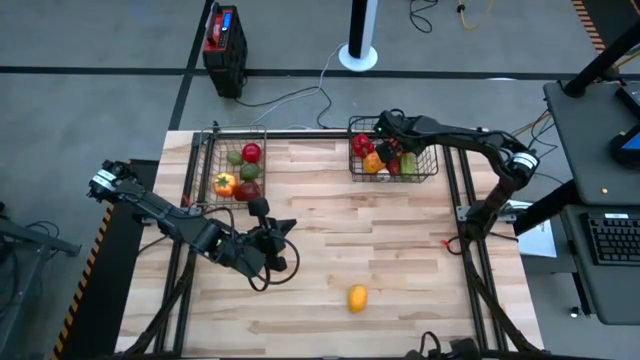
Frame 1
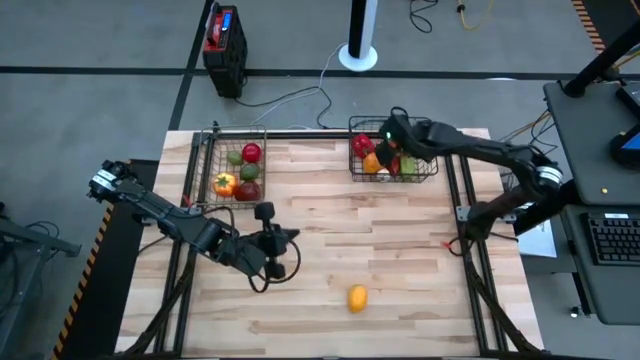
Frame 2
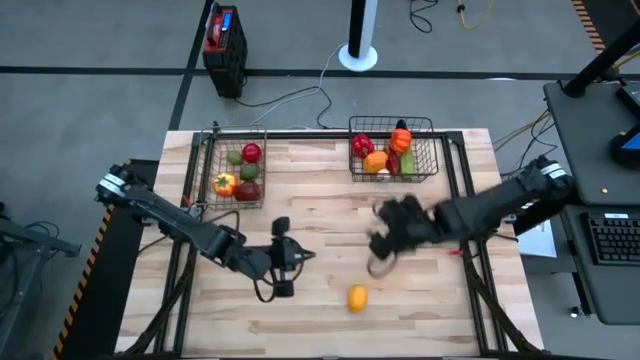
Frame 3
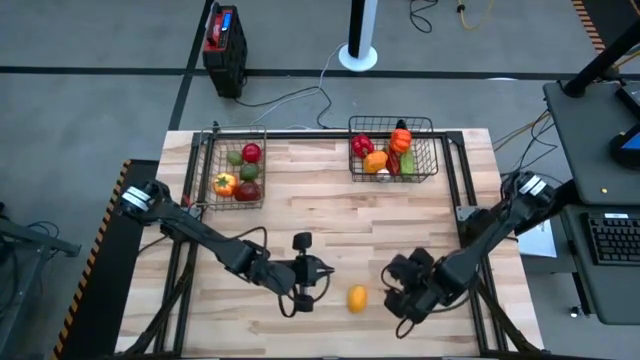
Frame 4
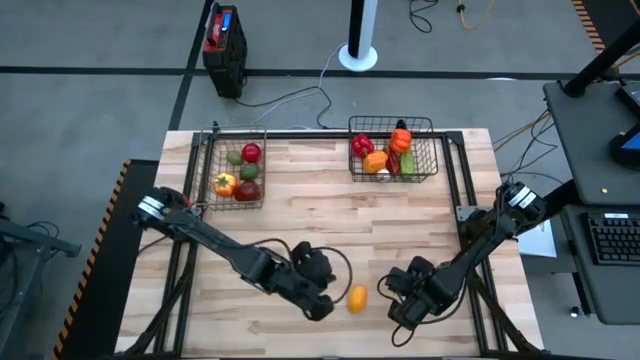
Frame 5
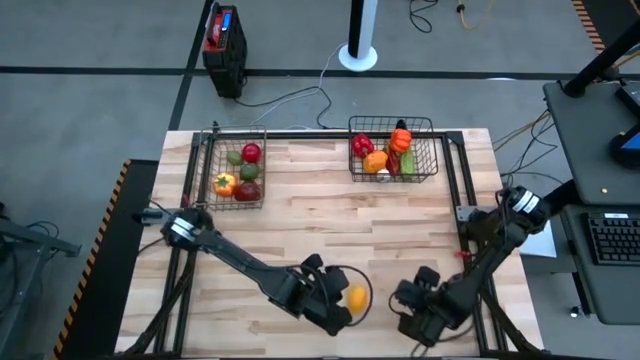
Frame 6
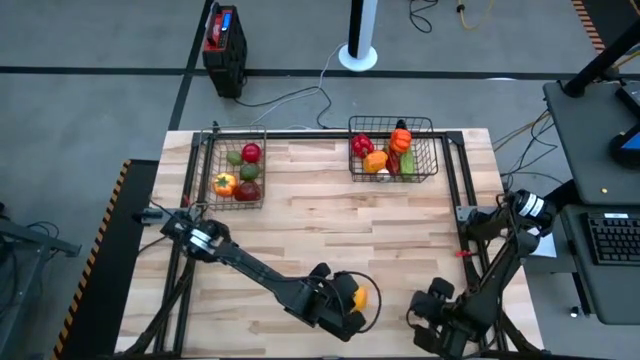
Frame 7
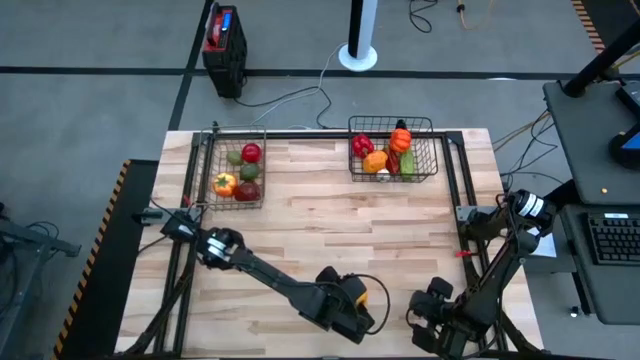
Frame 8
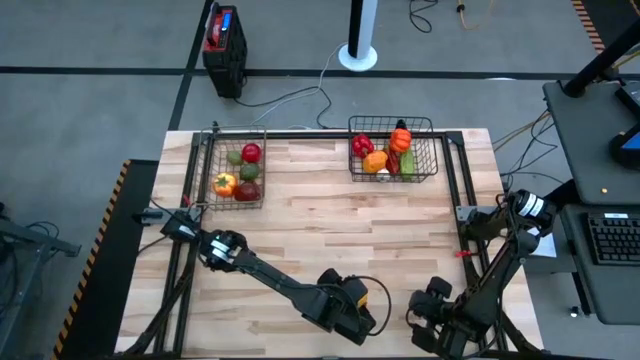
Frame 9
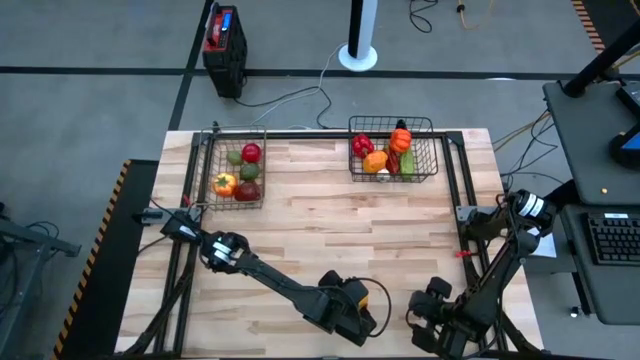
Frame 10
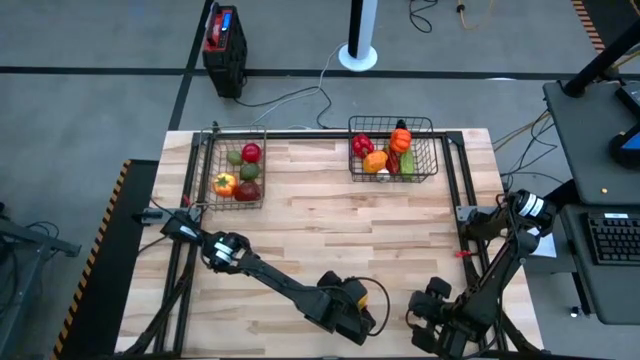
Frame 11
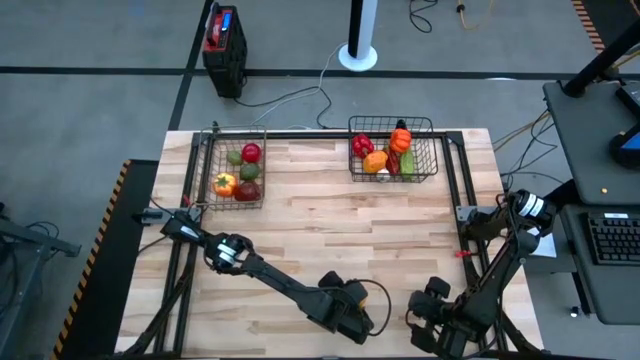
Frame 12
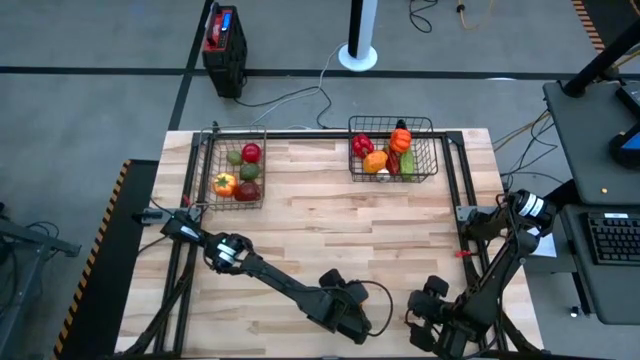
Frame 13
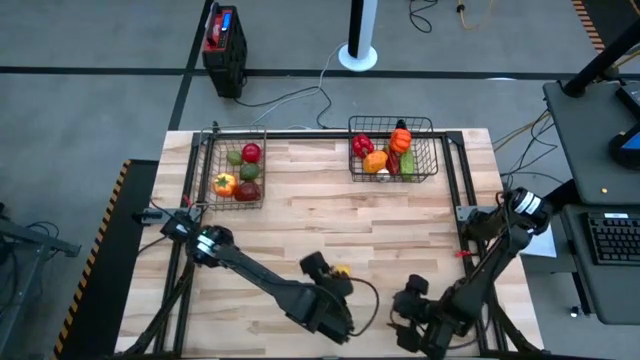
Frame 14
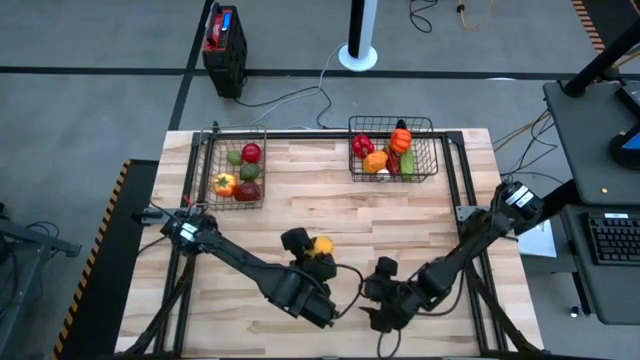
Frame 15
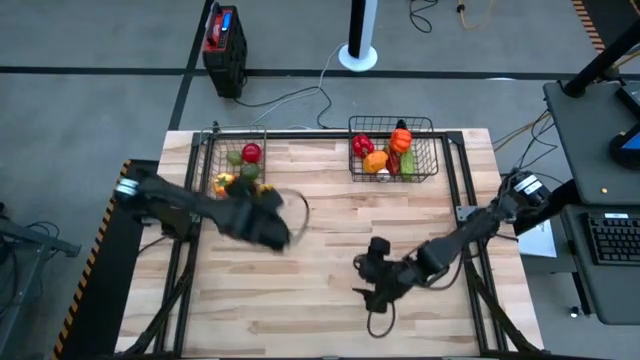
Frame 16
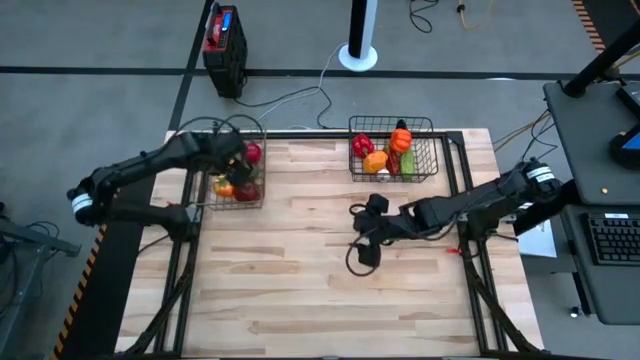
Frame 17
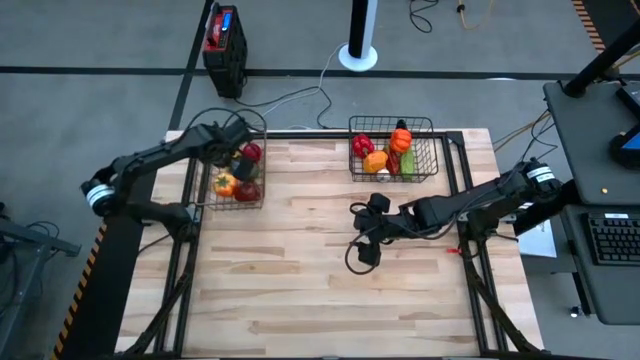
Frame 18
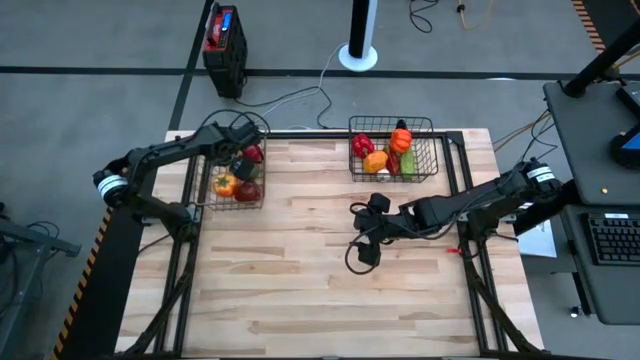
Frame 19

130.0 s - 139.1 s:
Task: Sort produce into baskets
Put the lemon into the brown wire basket

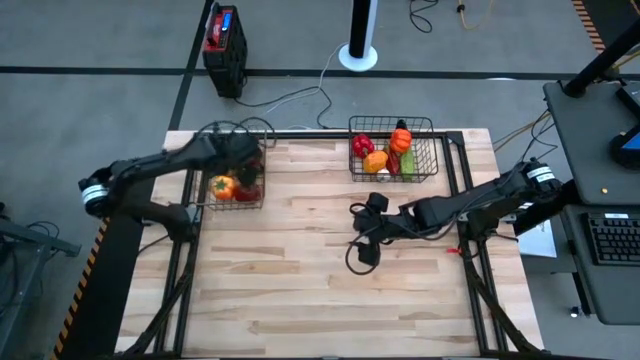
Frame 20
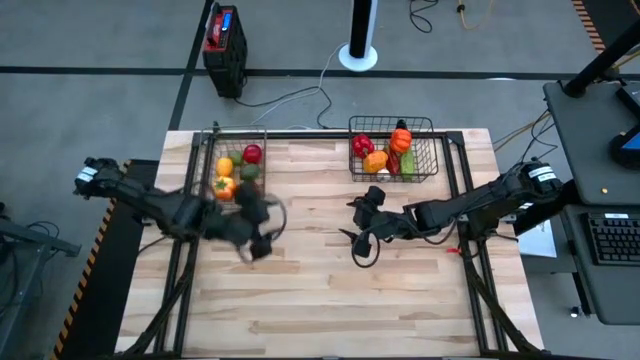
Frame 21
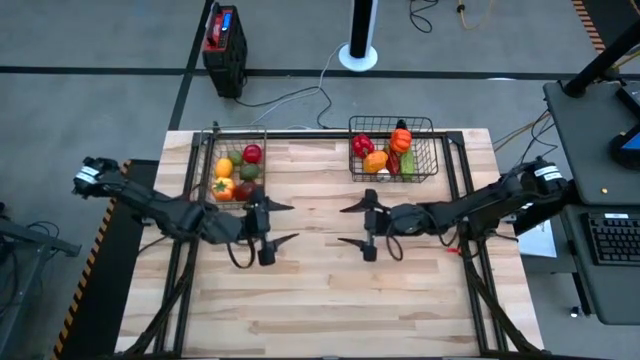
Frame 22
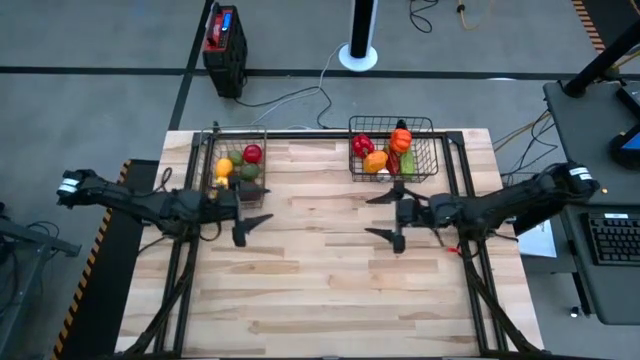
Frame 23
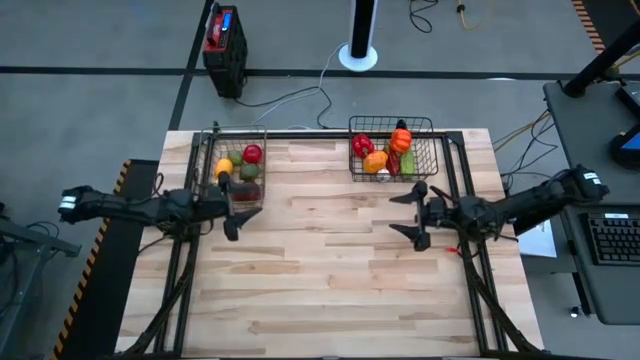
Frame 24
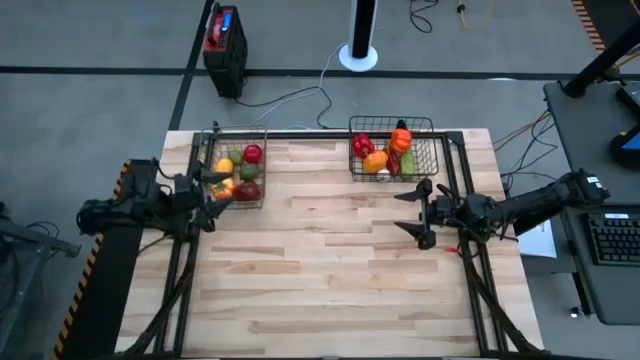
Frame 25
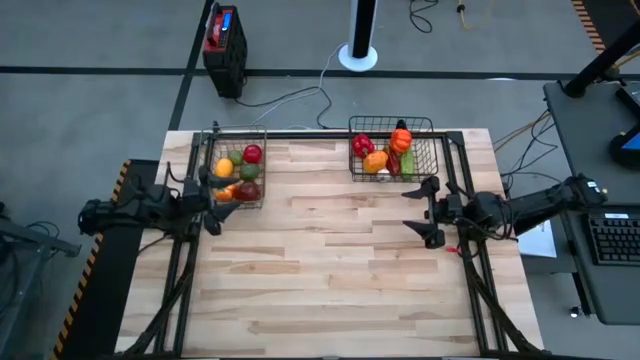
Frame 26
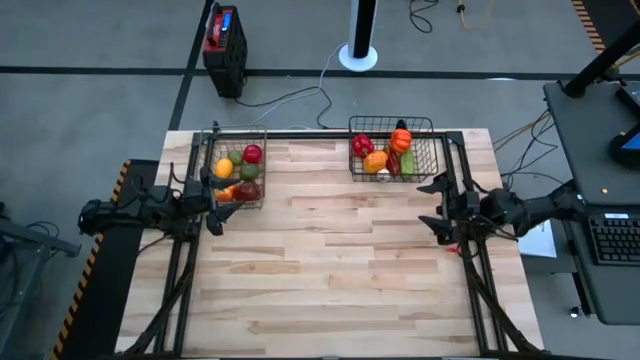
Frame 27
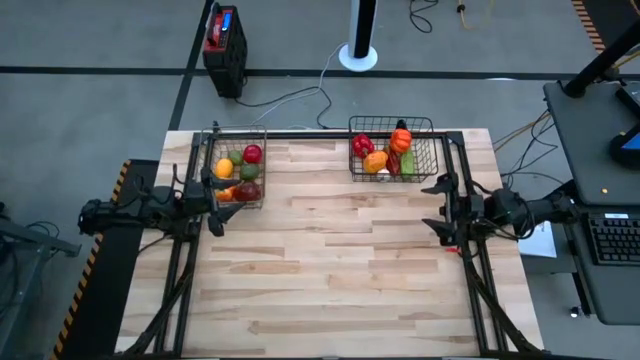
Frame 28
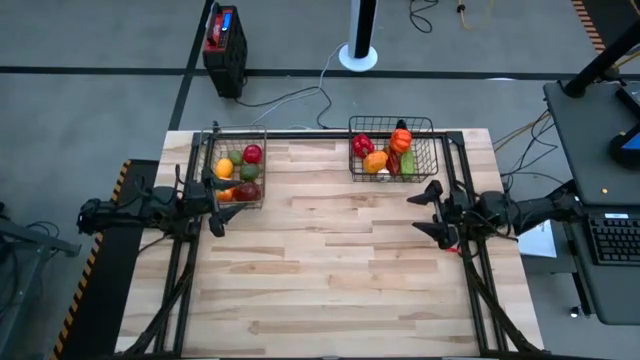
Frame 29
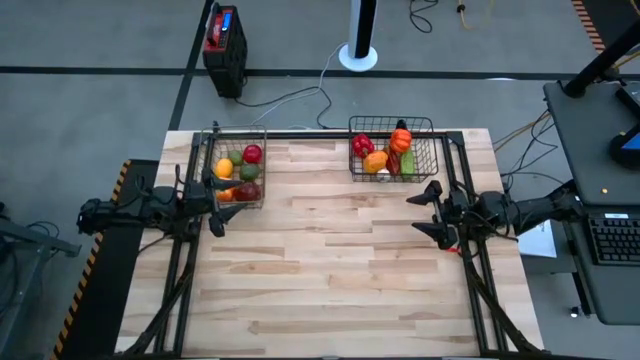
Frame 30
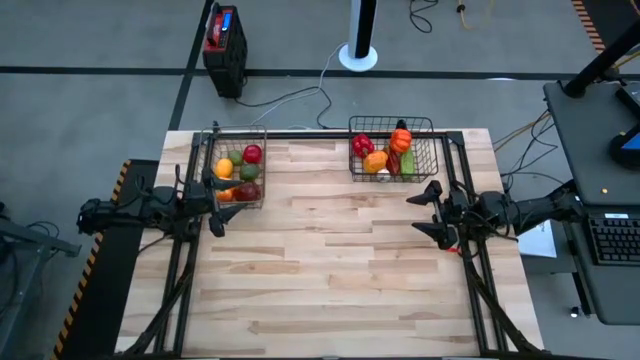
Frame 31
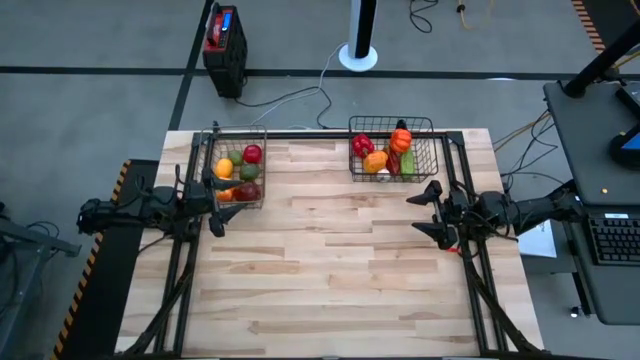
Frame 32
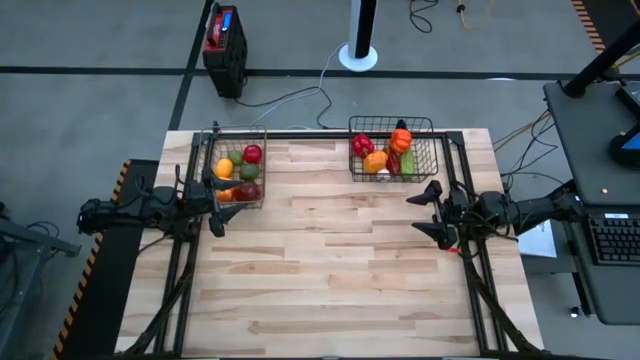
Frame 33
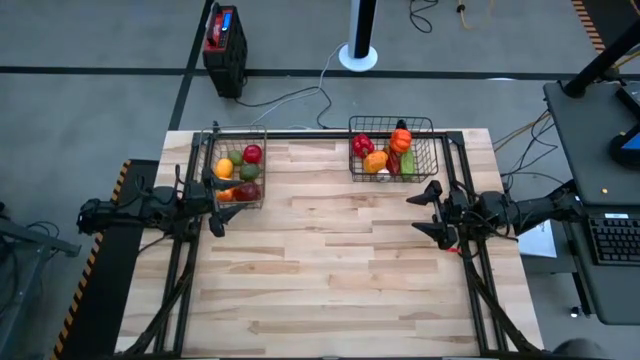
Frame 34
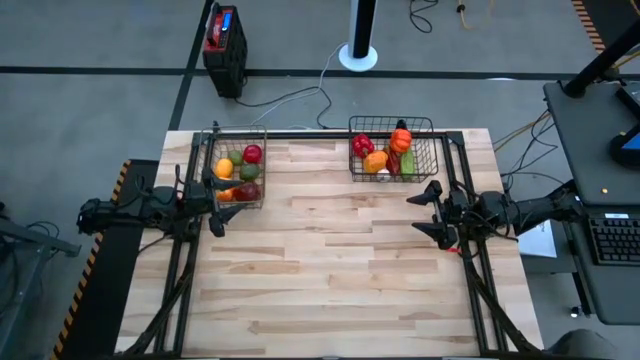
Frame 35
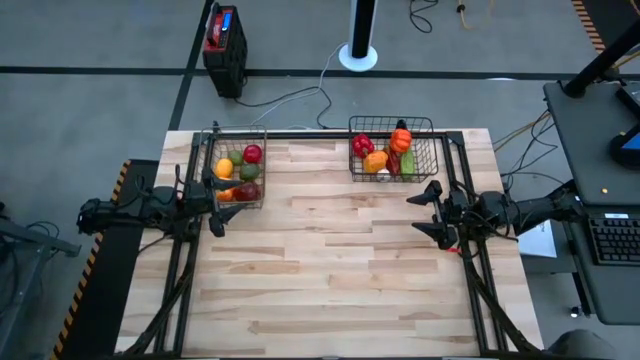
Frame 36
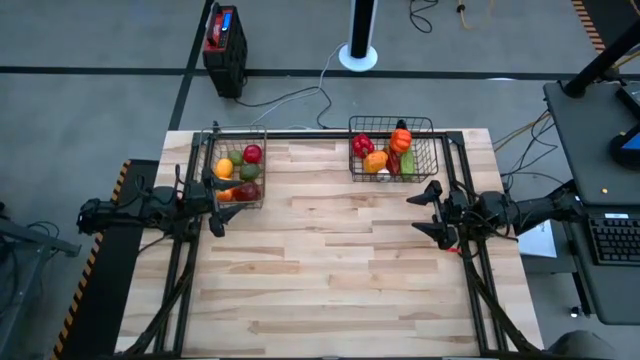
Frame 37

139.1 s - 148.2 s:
Return to Home Position

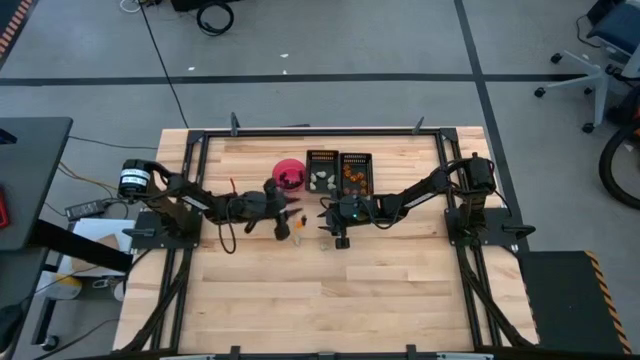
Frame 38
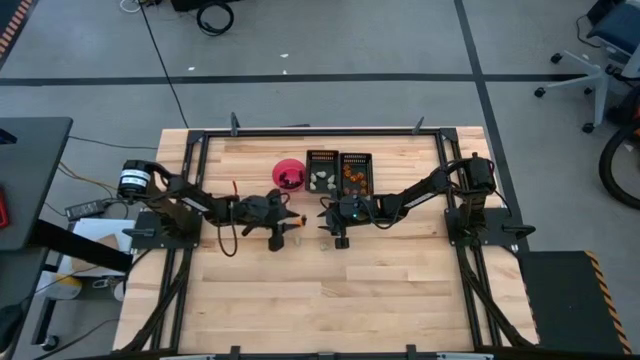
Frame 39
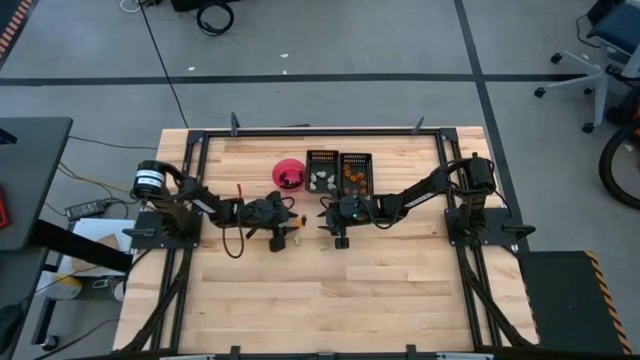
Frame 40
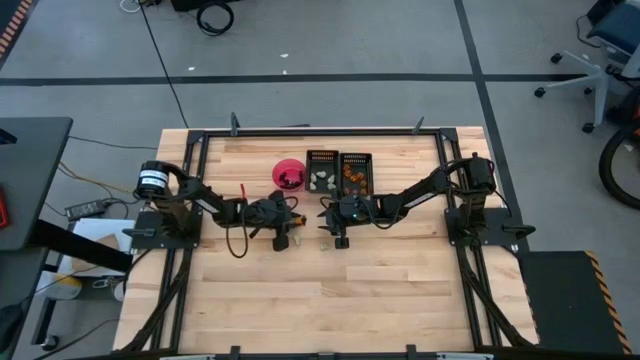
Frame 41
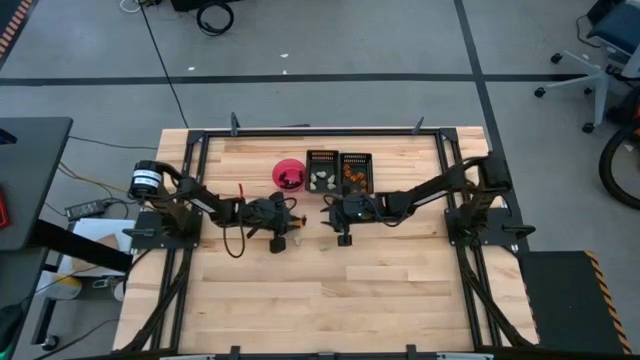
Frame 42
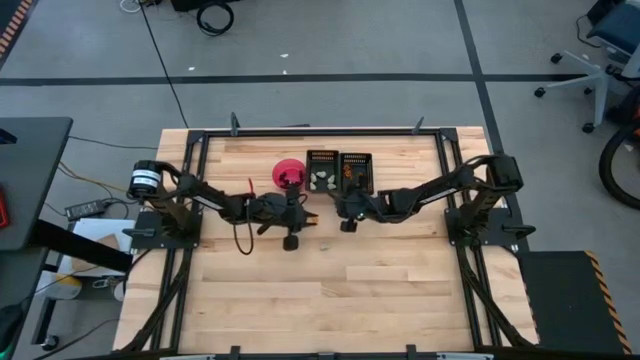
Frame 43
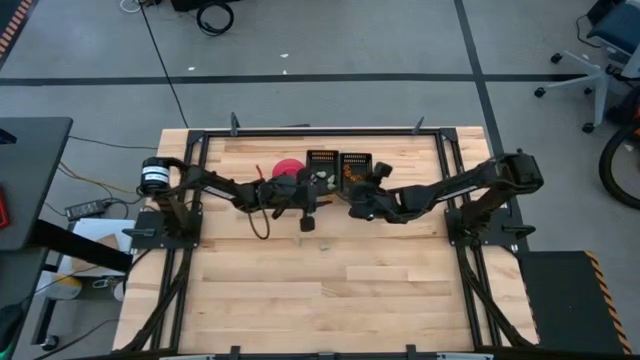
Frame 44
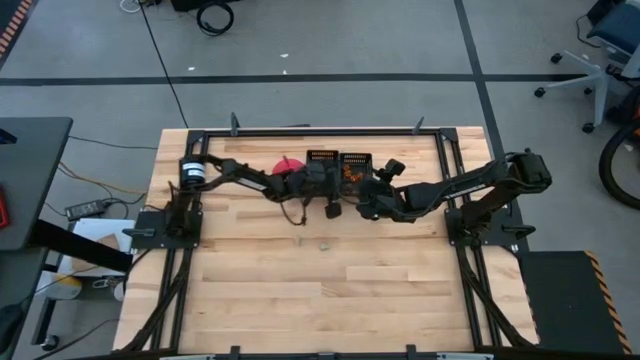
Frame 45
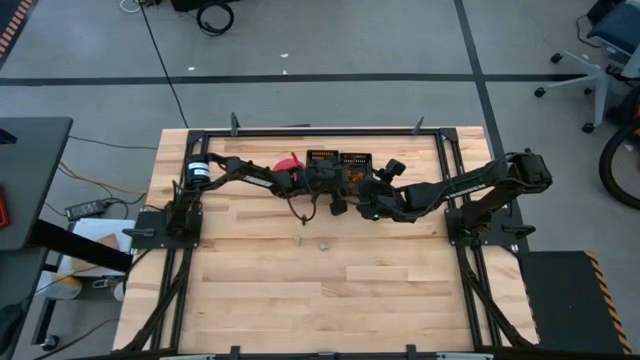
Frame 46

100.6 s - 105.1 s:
Task: Sort Halloween decoration
Put the orange pumpkin toy into the right black bin
